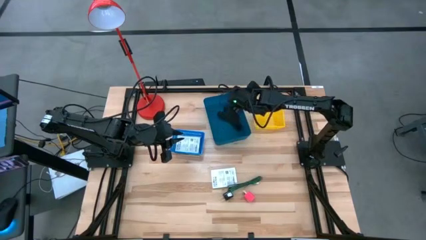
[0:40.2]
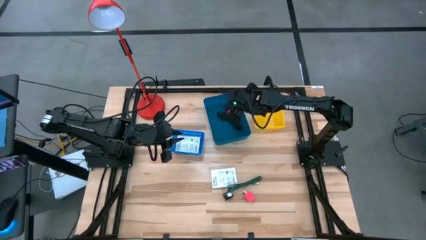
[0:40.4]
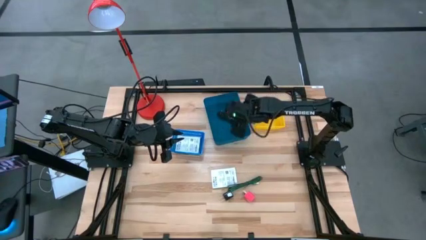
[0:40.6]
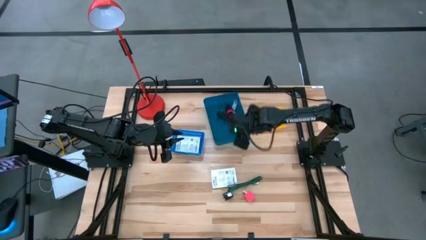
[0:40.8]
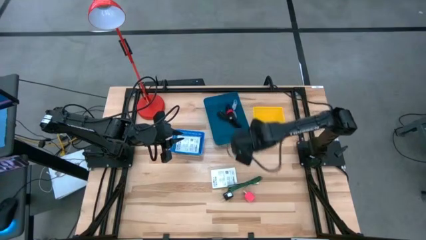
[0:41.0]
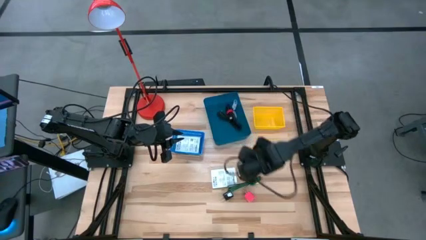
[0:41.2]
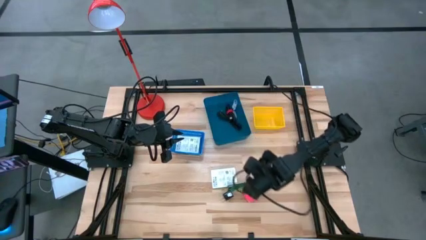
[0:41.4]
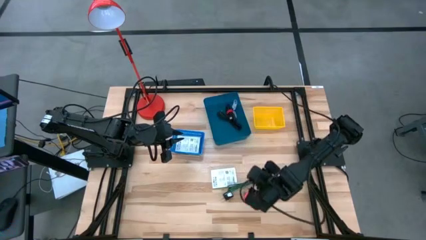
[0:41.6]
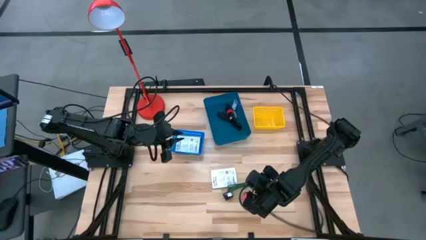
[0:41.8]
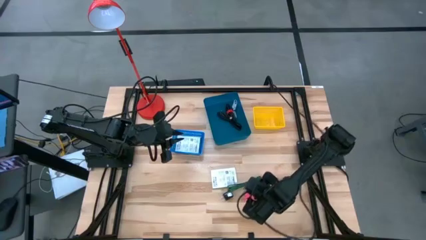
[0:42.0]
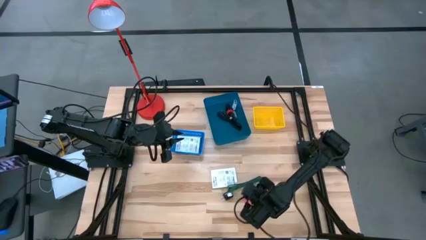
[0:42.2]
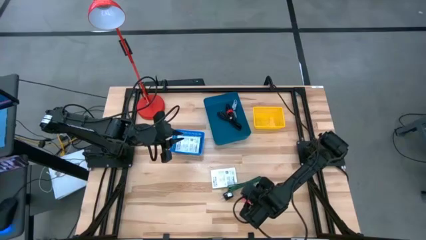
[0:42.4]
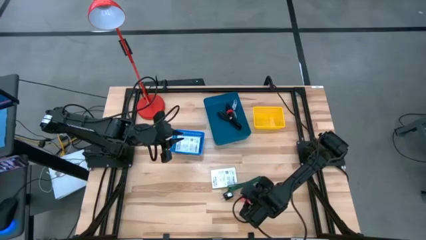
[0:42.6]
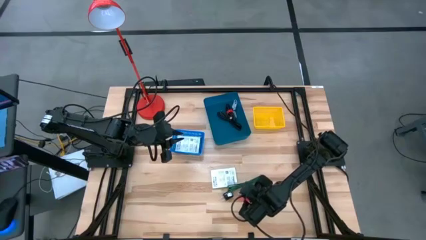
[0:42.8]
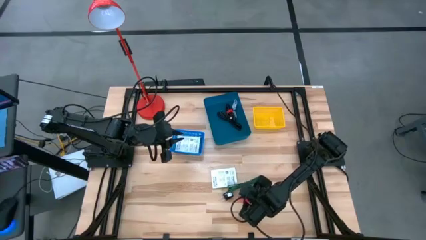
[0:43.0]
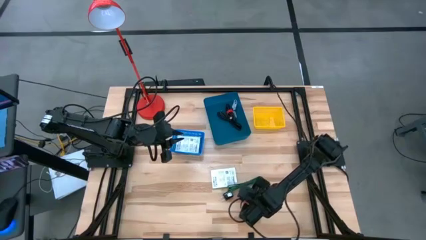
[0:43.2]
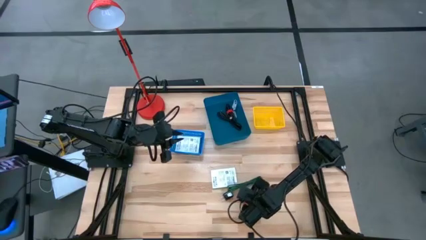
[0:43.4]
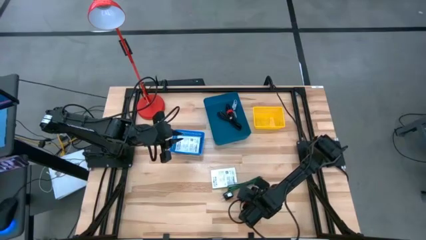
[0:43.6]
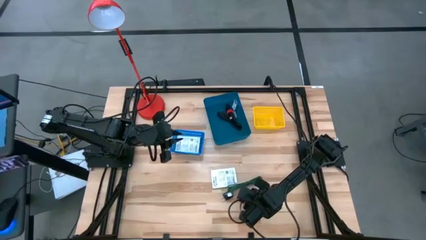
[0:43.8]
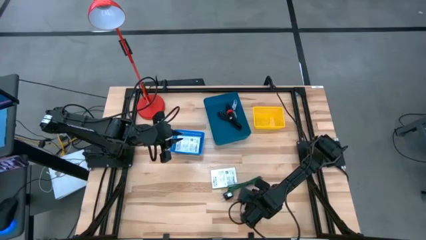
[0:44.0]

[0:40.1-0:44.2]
Task: Pick and place items into bin
Put the pink charger adapter into the yellow basket

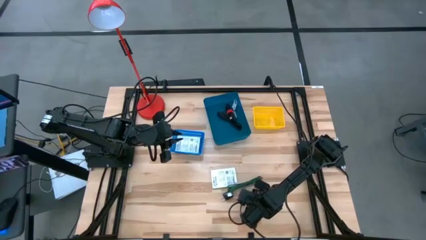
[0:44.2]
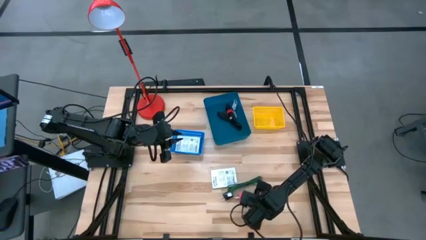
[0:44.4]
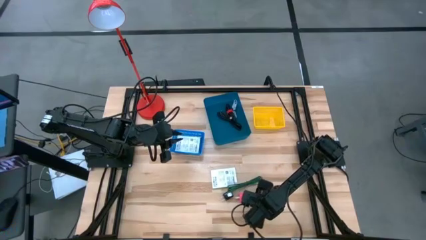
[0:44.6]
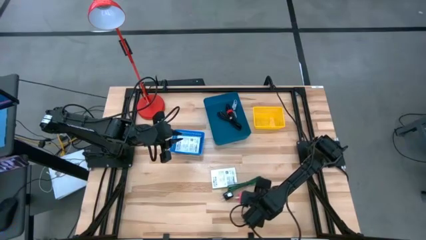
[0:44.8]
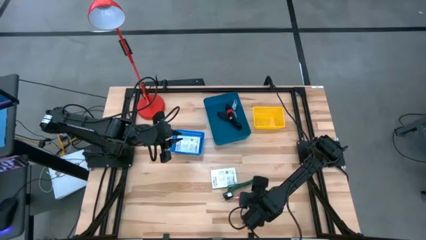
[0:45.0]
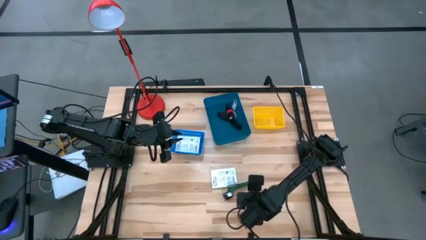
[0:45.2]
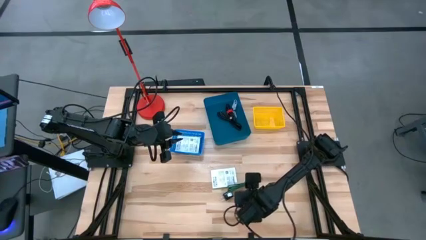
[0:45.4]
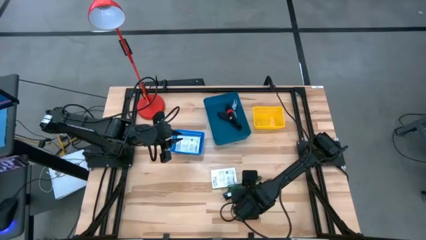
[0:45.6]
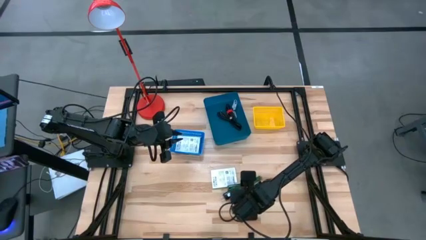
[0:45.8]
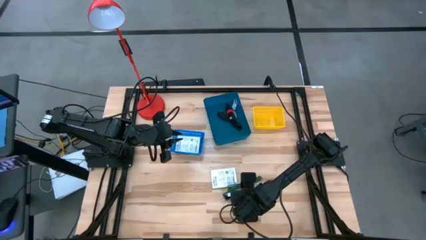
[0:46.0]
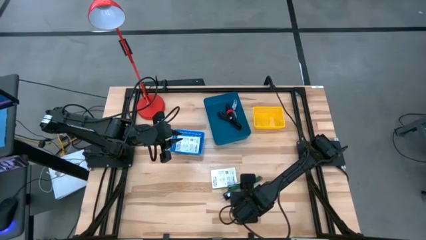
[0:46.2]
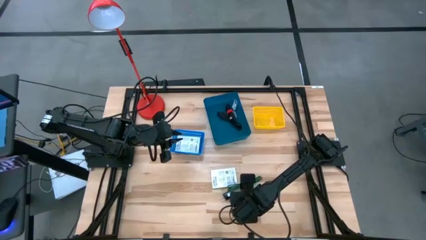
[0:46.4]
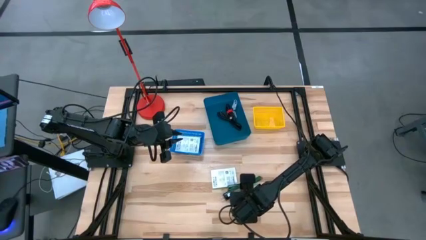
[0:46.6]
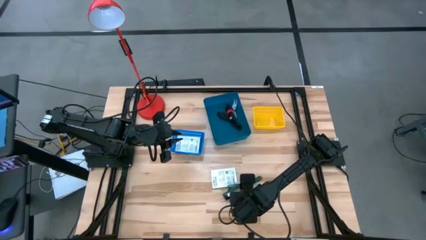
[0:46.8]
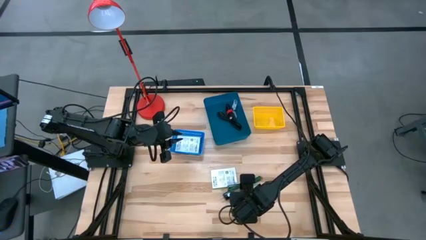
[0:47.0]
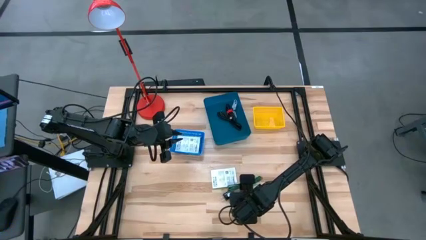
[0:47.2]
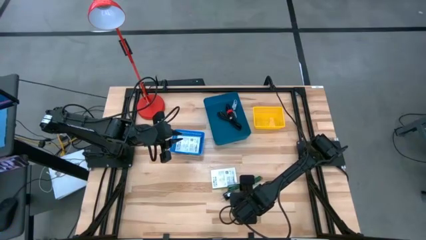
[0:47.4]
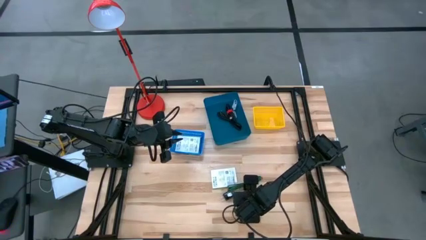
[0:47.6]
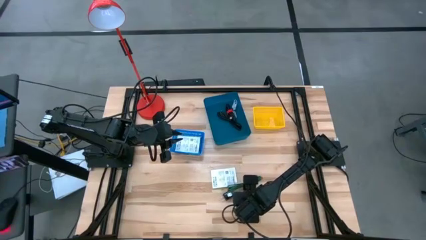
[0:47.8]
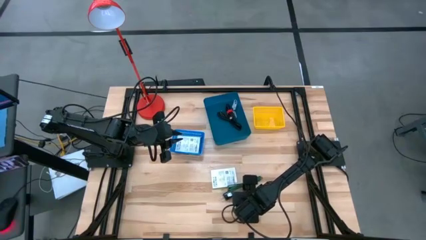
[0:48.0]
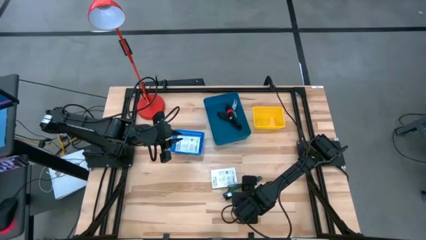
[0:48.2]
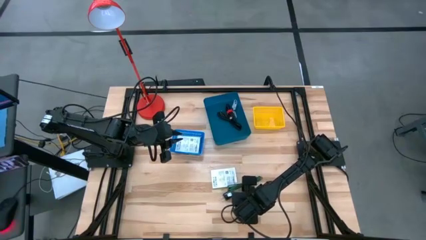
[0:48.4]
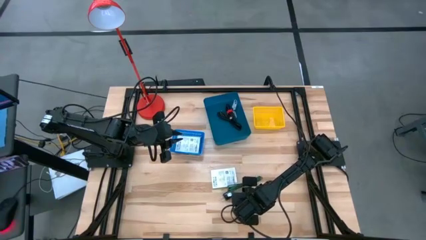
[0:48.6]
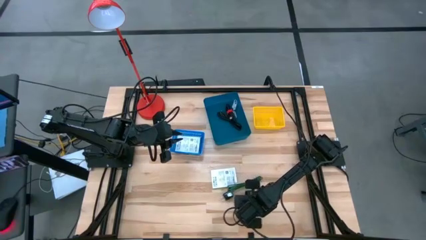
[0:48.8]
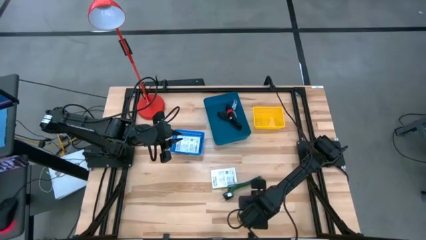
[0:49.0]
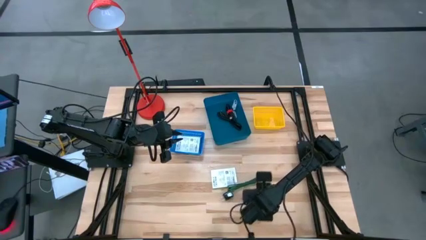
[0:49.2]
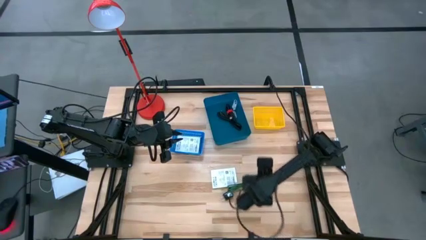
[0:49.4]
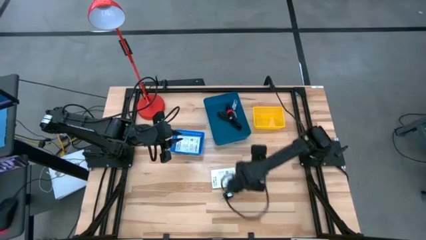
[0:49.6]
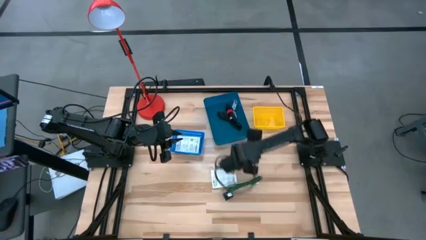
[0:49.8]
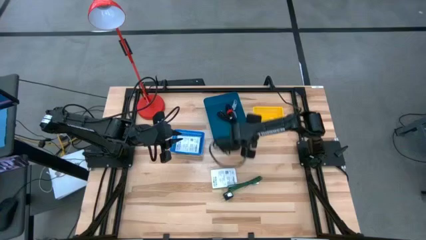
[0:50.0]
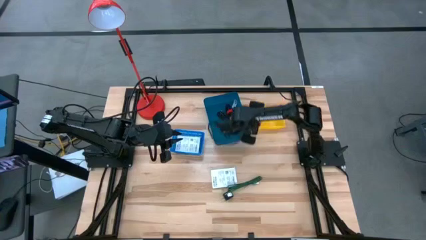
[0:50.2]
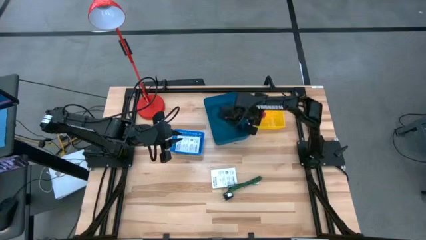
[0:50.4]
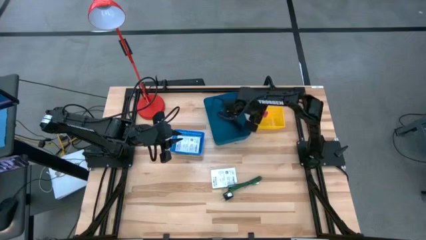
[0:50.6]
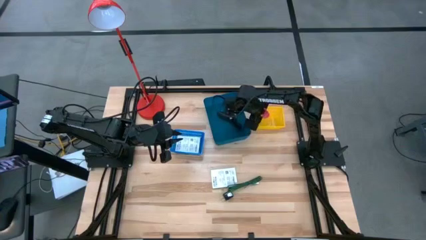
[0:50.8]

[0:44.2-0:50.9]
Put the pink charger adapter into the yellow basket

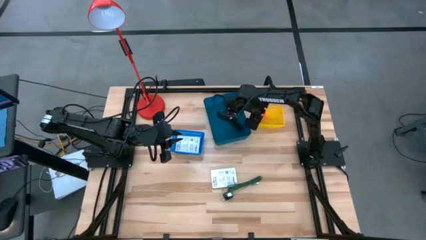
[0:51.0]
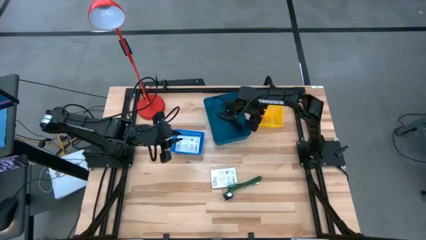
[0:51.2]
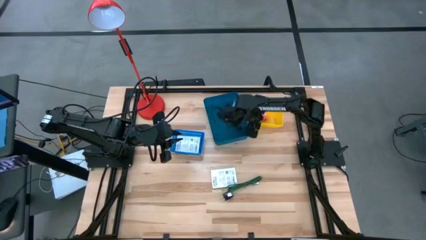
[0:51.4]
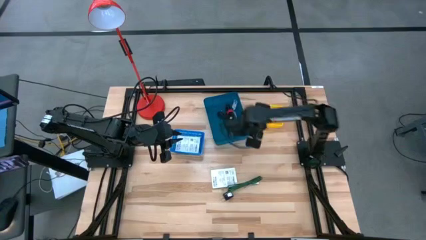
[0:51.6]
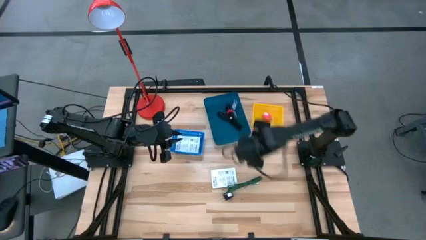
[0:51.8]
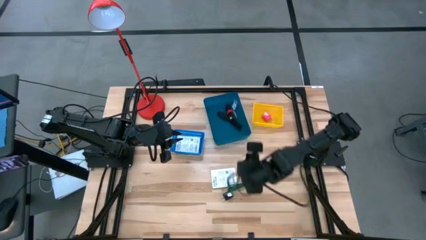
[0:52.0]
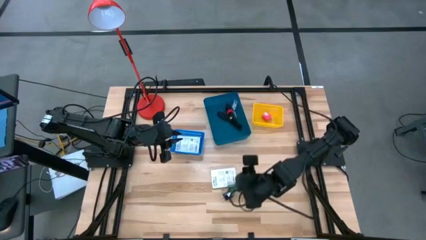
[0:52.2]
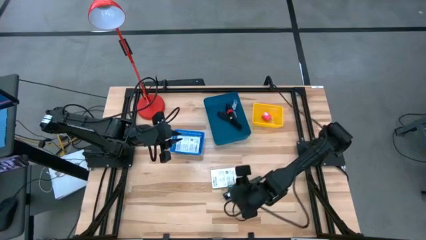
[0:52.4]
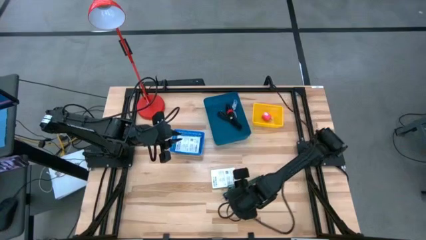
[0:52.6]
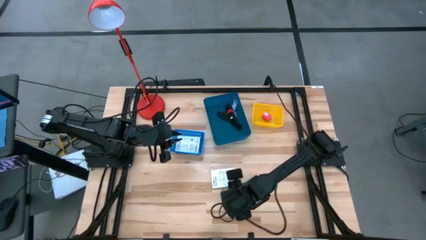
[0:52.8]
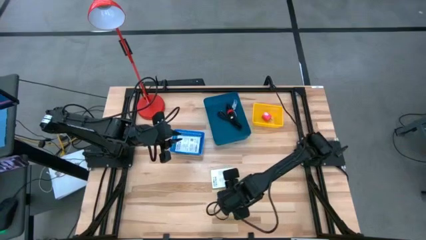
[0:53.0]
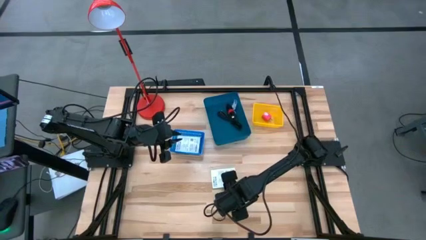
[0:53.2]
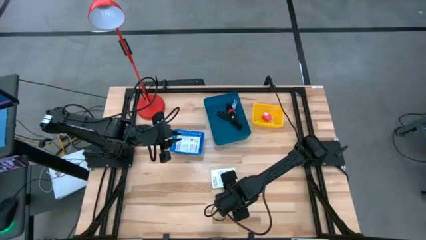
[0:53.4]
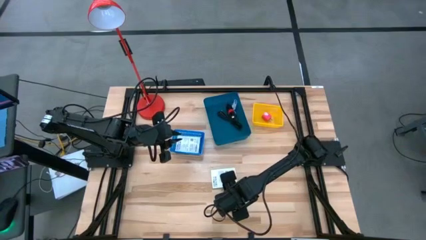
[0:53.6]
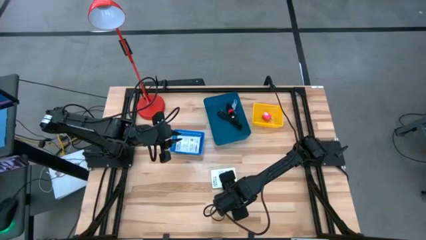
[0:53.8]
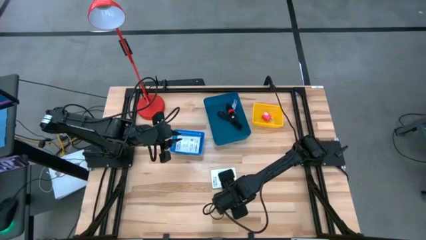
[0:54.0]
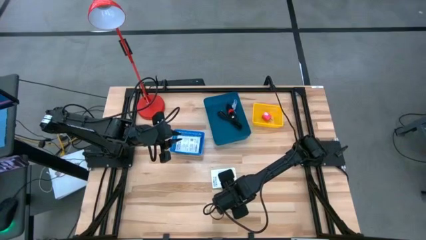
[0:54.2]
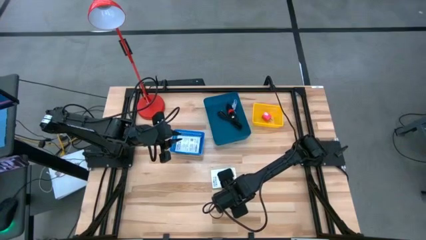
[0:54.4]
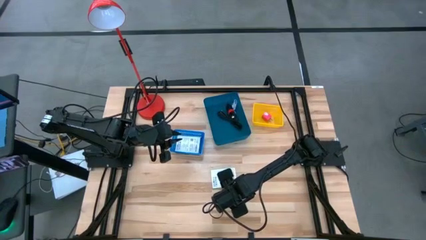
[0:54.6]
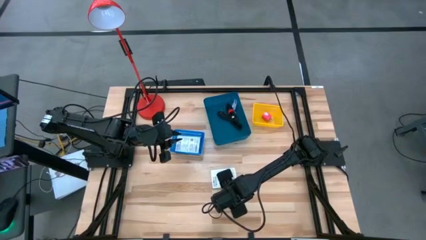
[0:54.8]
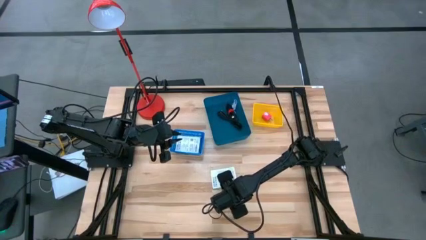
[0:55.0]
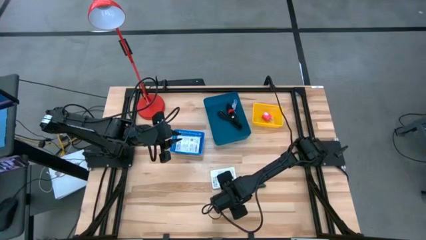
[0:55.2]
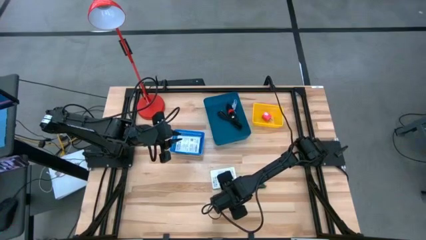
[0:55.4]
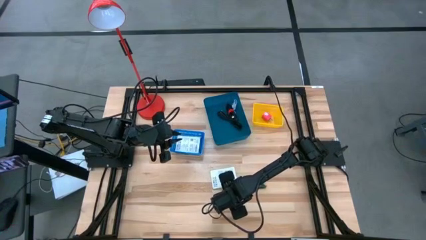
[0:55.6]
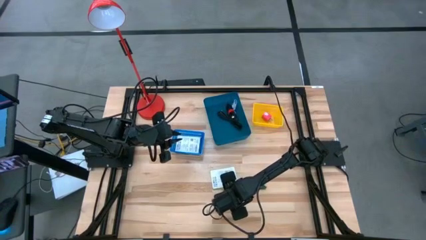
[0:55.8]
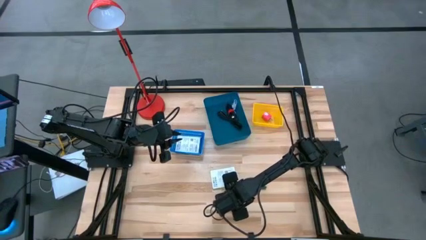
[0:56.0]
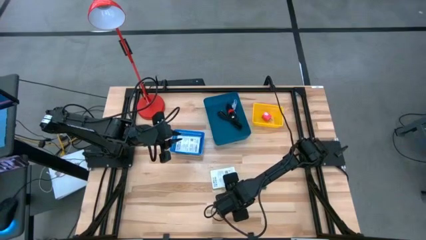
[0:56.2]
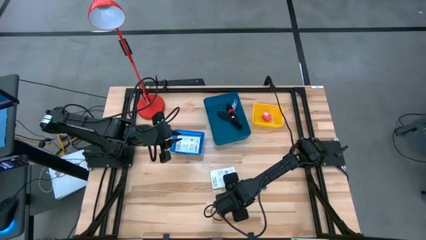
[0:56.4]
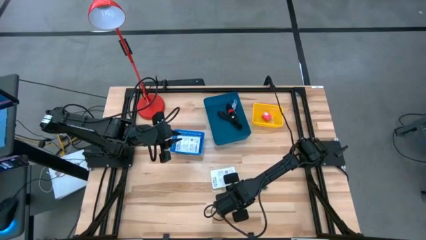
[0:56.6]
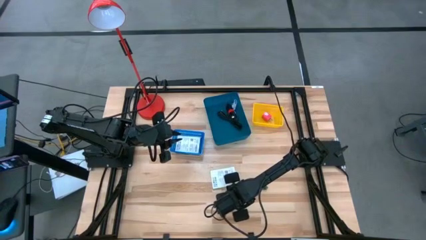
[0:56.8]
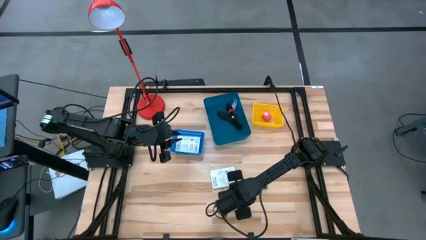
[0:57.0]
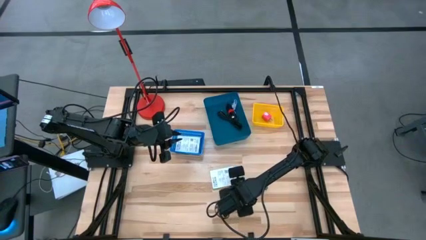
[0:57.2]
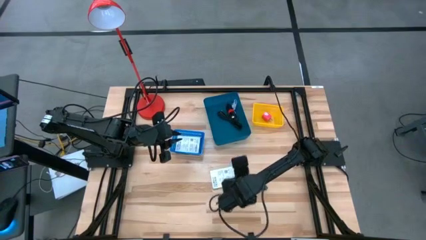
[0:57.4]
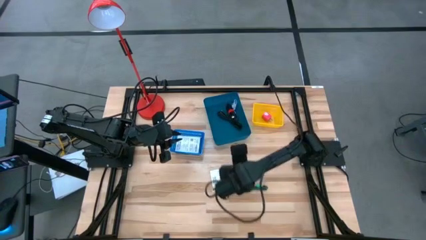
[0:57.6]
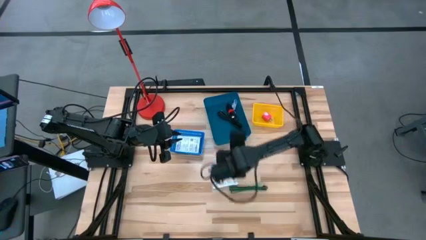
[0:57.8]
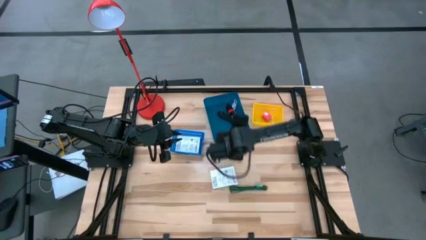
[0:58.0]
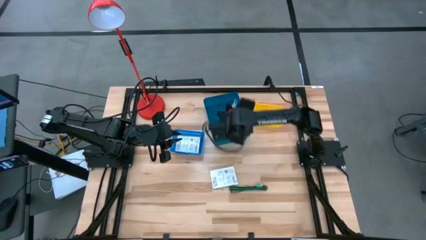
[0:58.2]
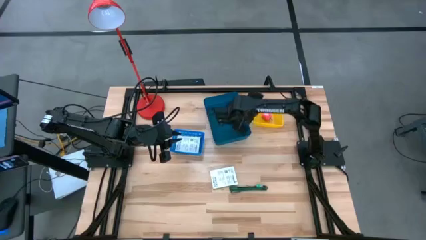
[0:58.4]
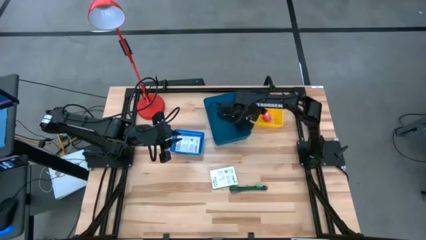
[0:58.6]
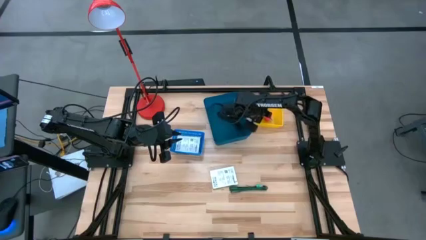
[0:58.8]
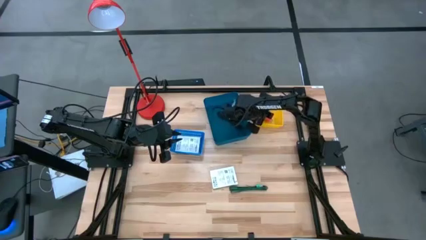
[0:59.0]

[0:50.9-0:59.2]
Put the black charger adapter into the yellow basket
